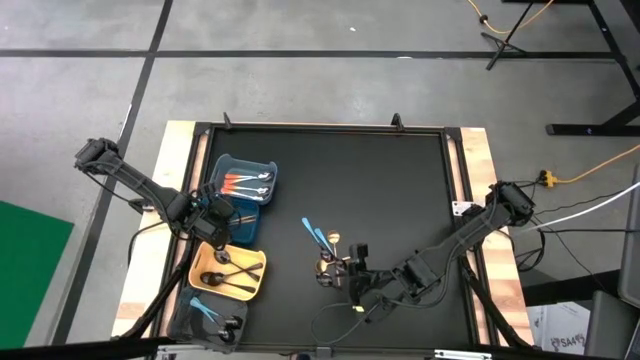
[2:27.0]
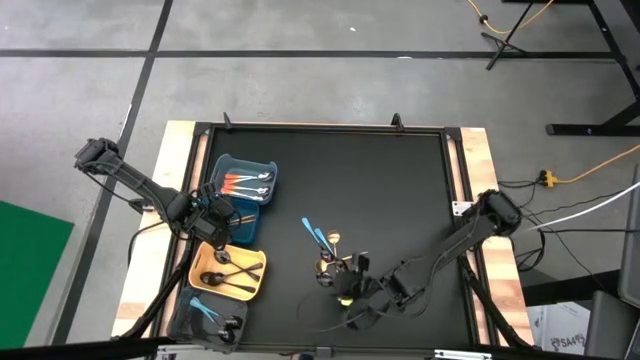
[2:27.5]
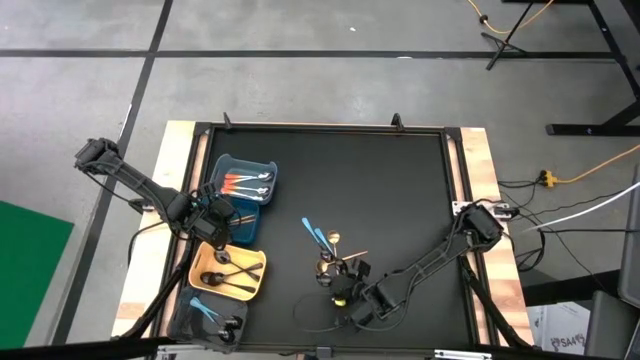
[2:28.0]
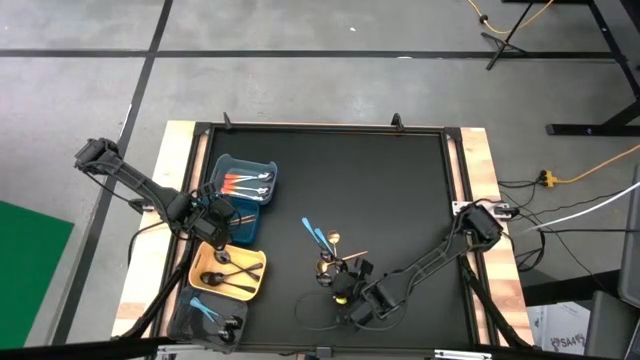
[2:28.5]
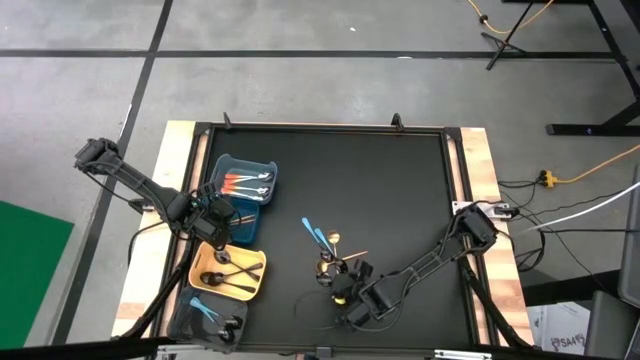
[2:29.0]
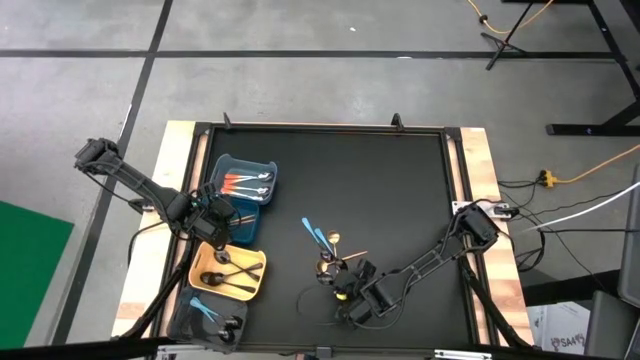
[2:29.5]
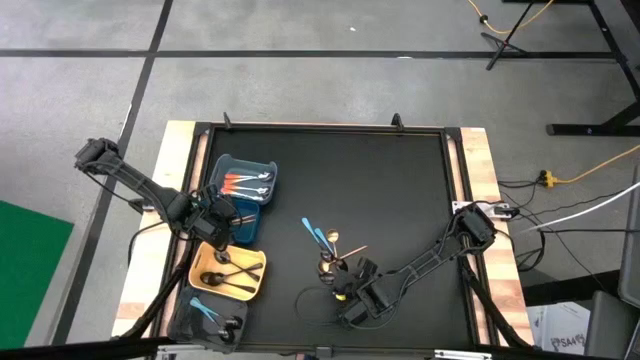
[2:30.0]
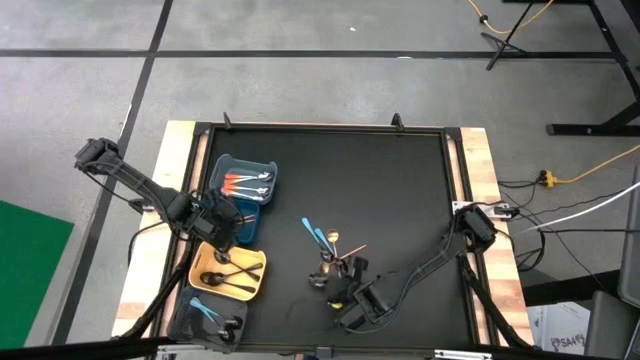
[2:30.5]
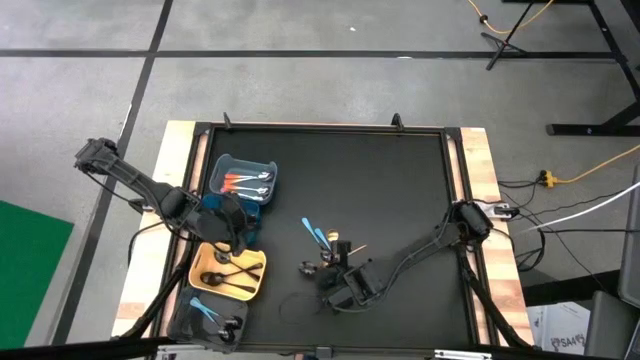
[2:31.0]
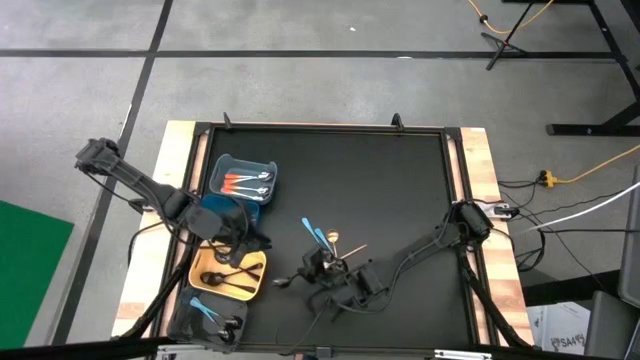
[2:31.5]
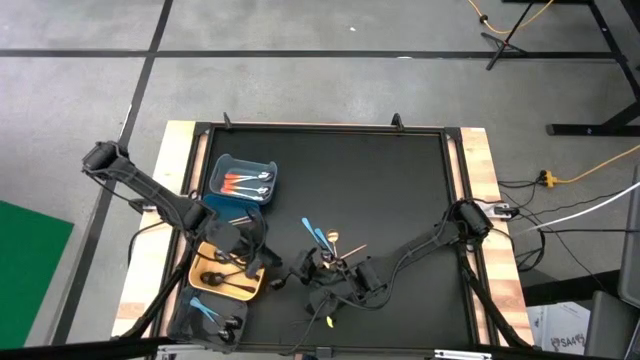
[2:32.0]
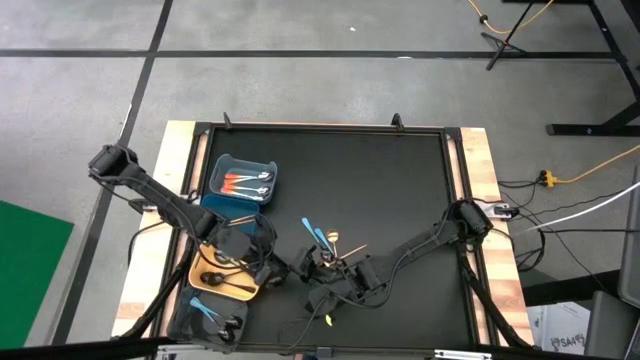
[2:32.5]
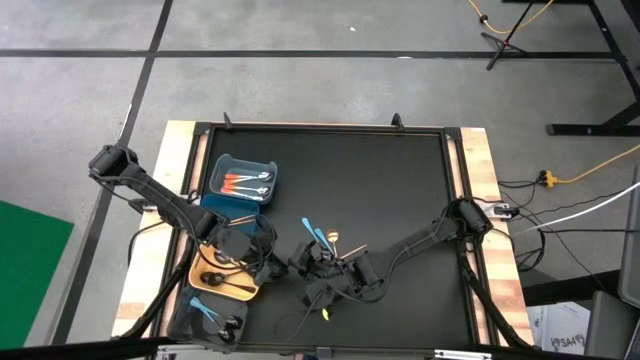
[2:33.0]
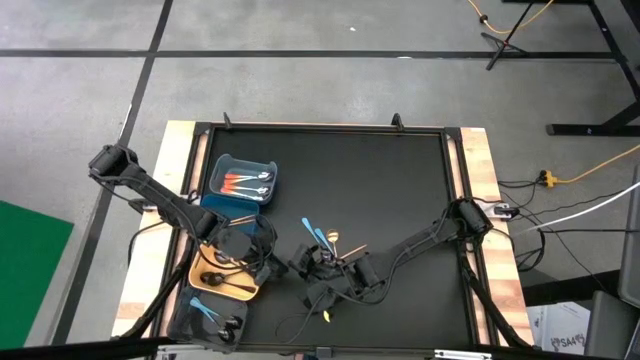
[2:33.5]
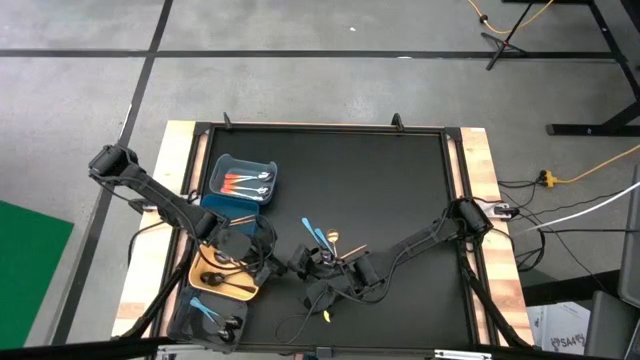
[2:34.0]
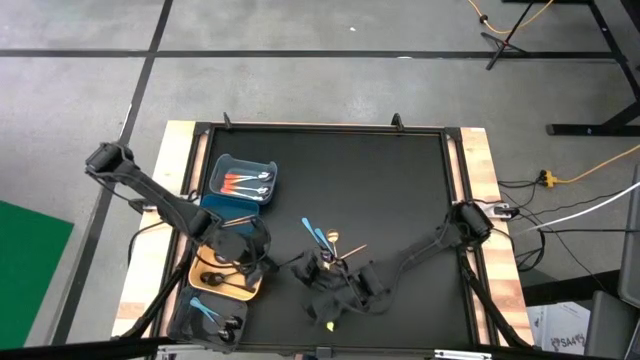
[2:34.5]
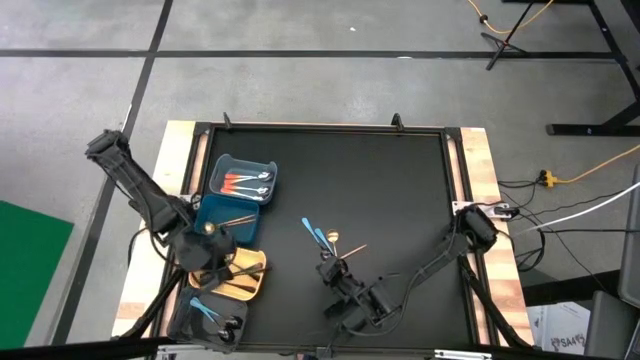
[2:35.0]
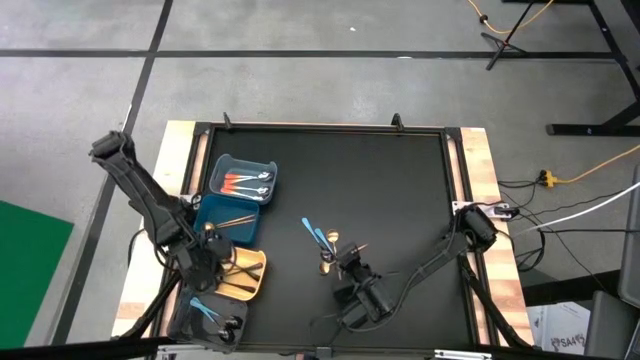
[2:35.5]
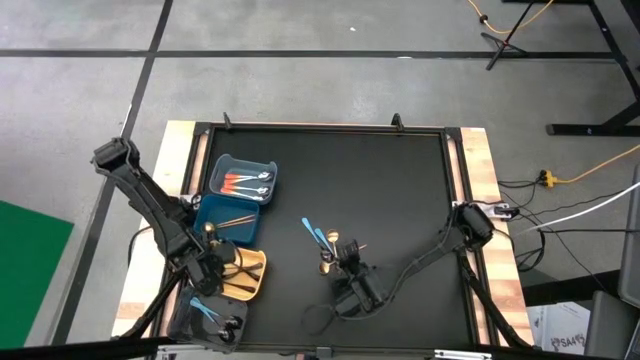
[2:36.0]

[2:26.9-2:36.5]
Task: Sort silverware by color (type)
Put the black spoon into the orange bin

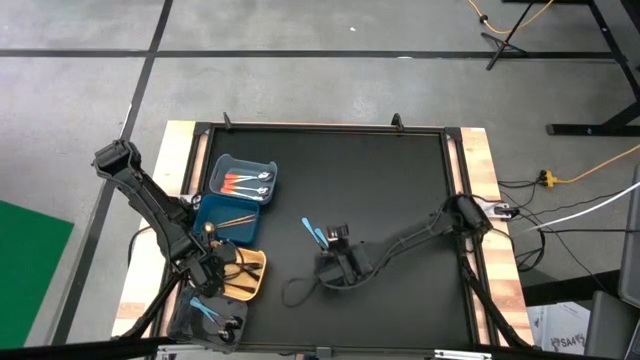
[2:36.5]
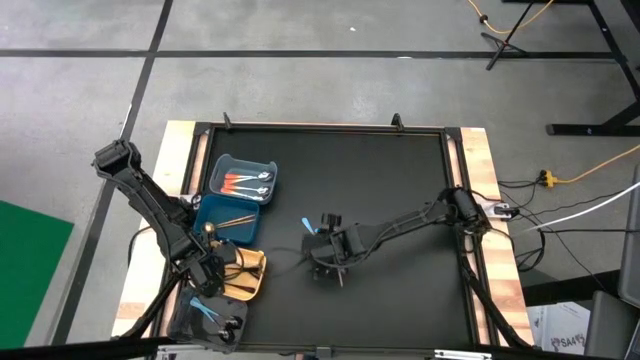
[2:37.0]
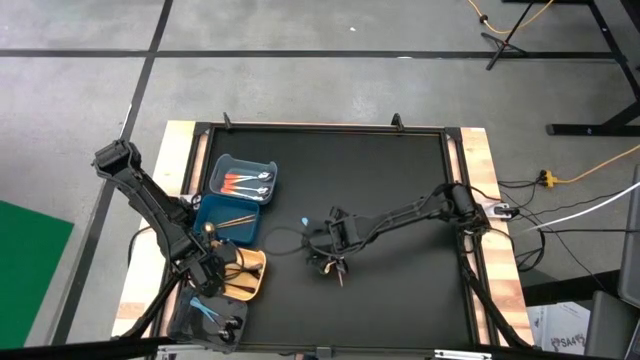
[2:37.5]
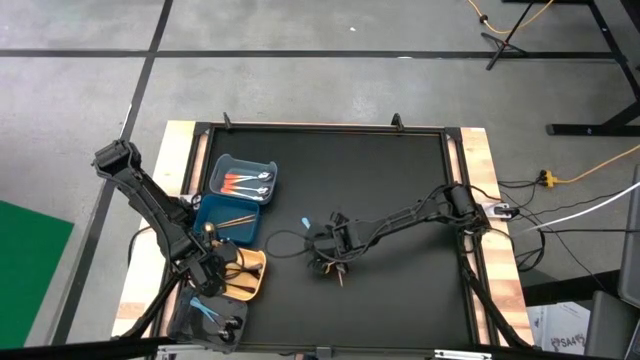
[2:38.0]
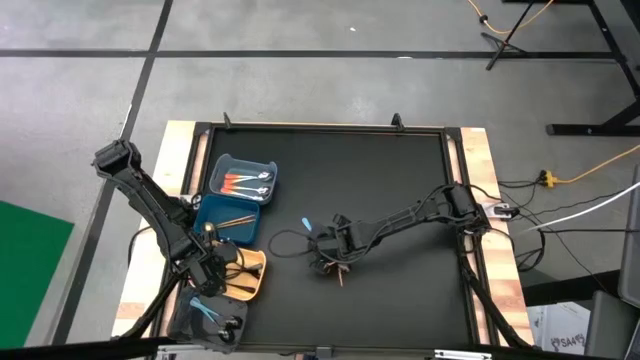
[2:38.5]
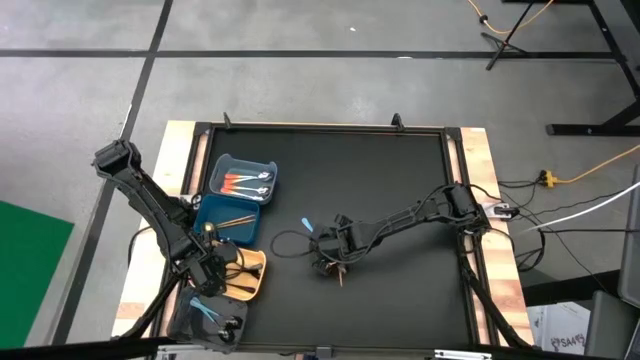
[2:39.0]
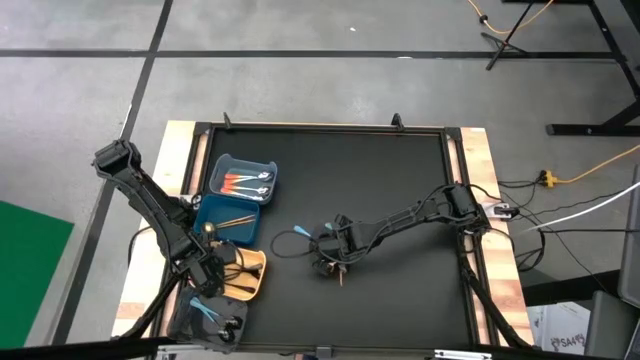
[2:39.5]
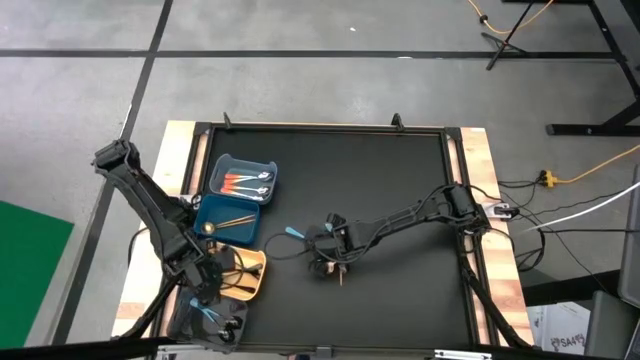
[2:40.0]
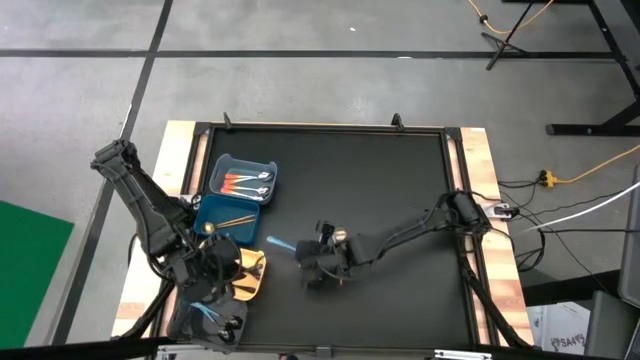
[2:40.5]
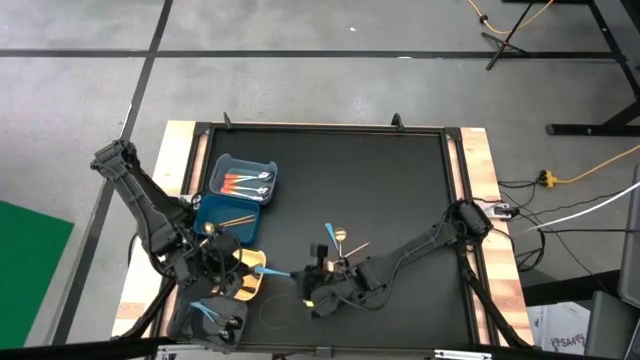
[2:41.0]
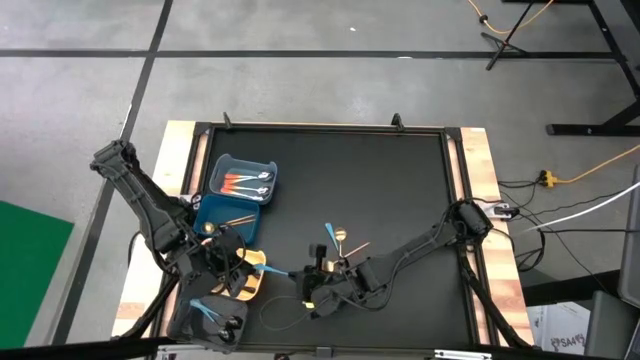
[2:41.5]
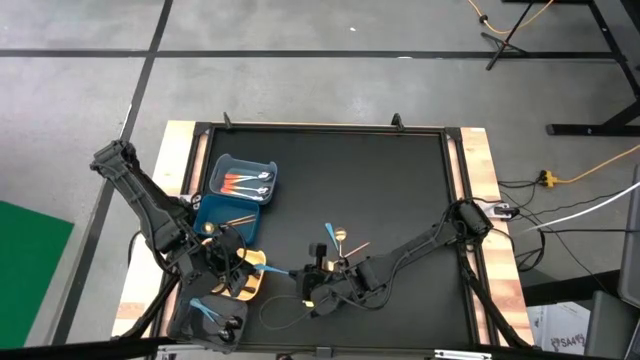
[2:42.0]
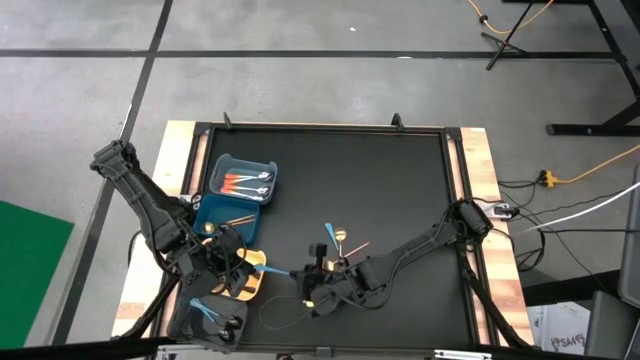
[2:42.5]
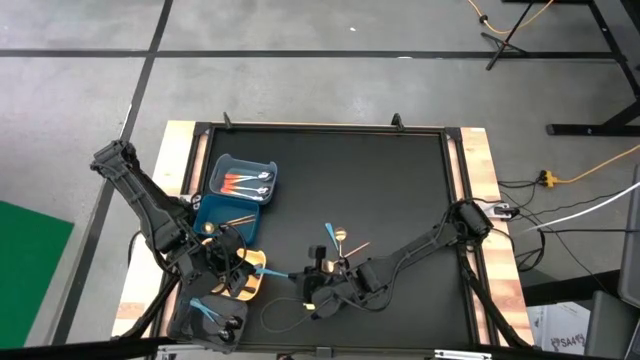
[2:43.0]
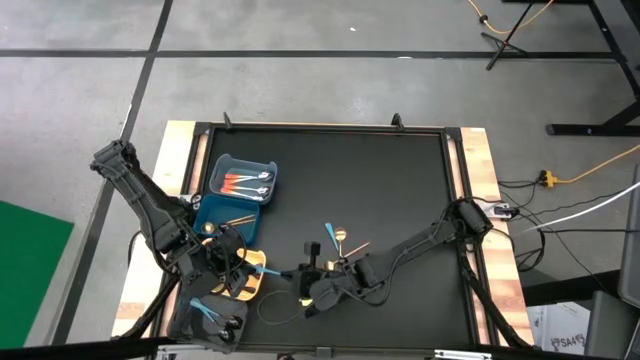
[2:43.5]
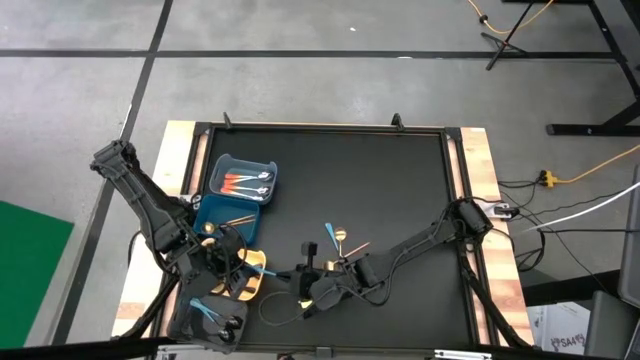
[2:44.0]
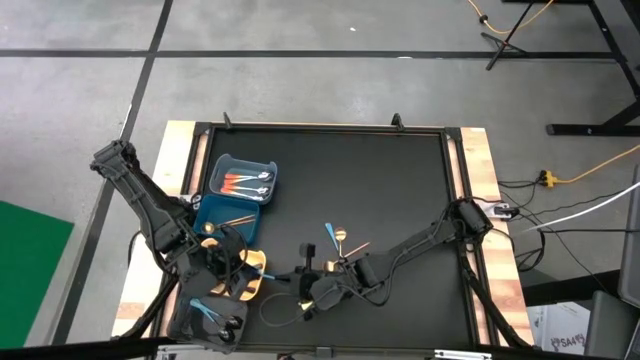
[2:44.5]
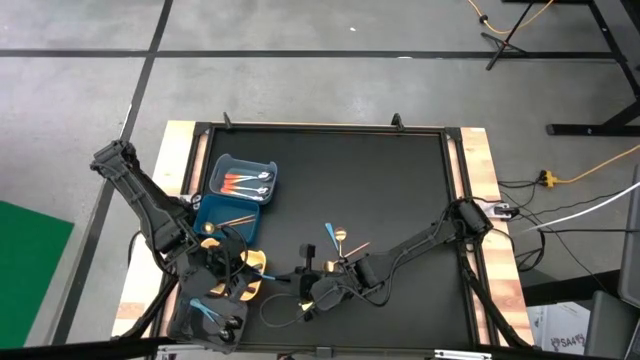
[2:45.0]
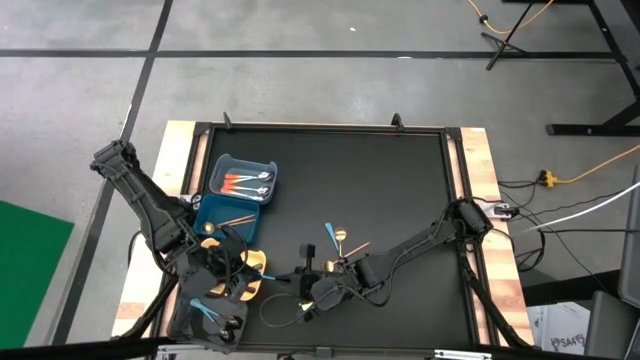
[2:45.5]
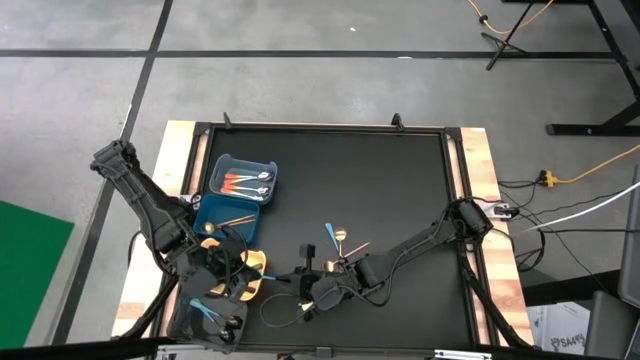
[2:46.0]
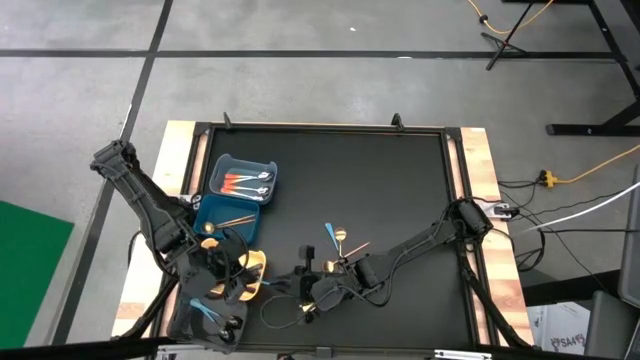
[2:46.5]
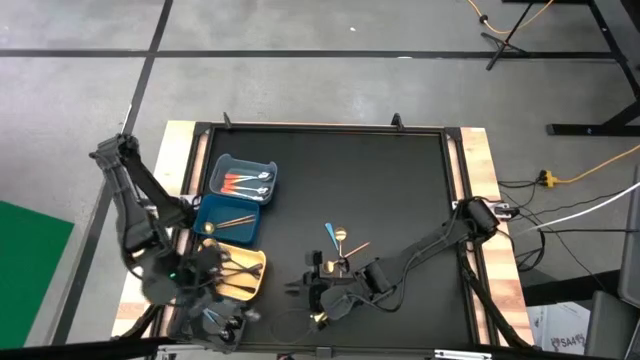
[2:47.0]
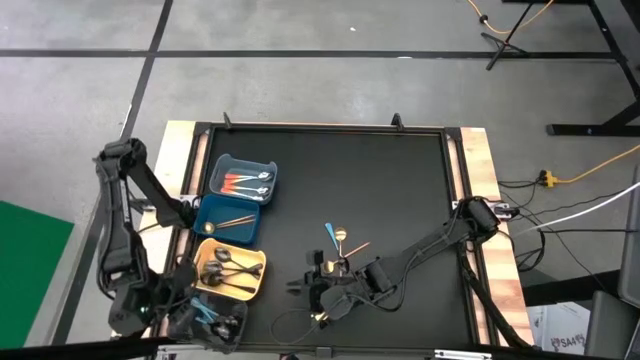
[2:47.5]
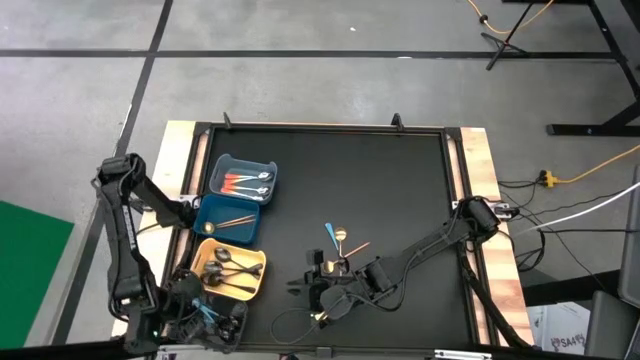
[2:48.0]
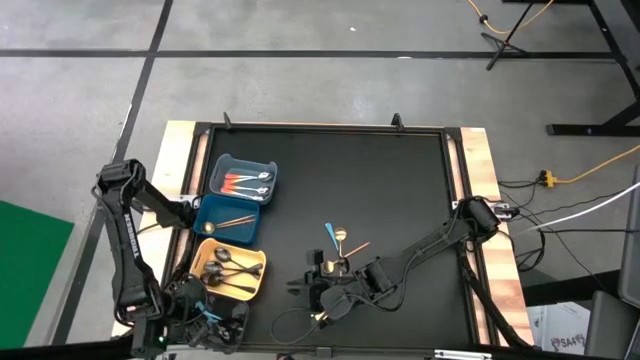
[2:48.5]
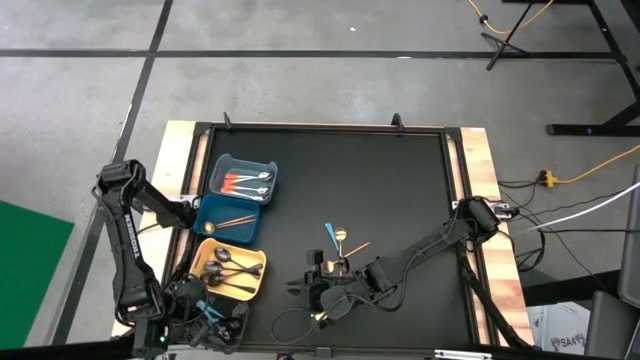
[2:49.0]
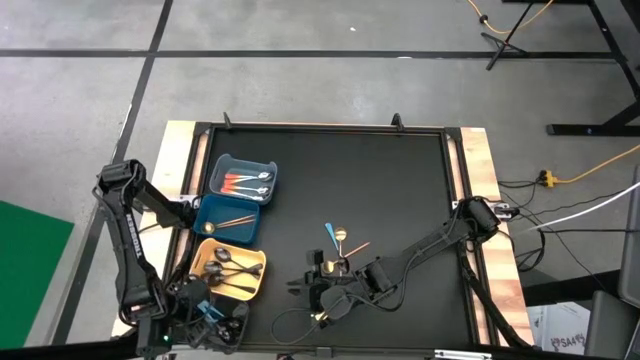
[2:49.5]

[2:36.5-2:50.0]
Put the blue spoon into the black bin
